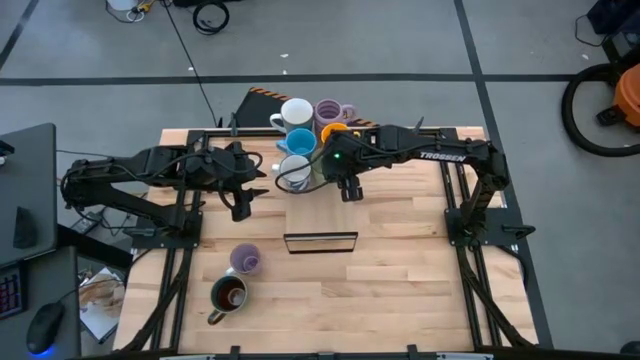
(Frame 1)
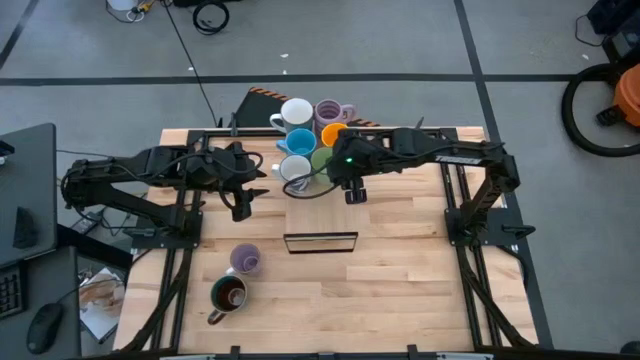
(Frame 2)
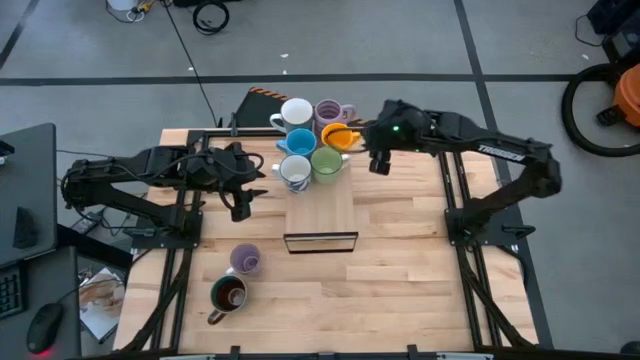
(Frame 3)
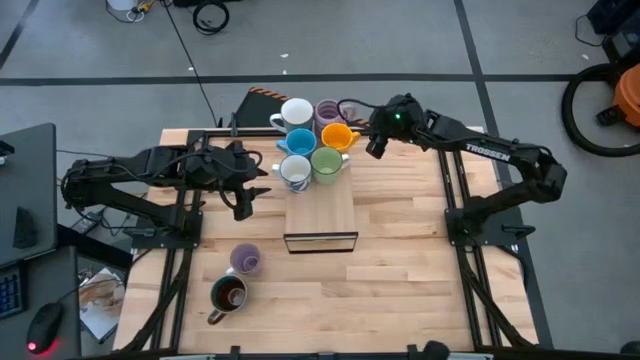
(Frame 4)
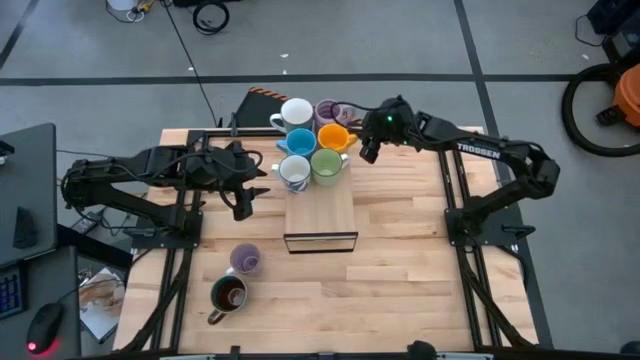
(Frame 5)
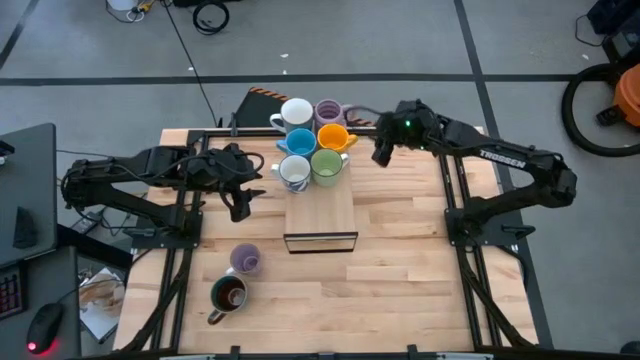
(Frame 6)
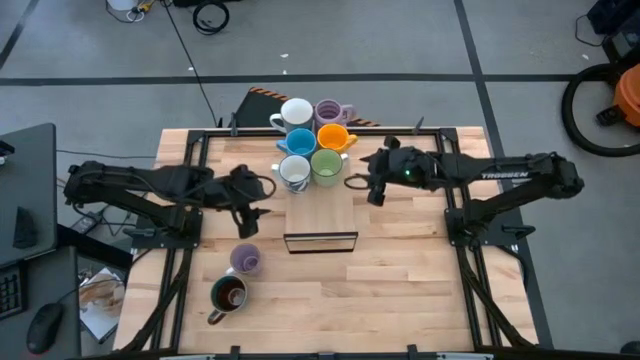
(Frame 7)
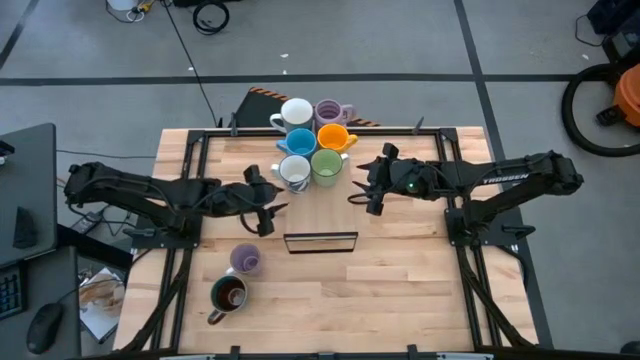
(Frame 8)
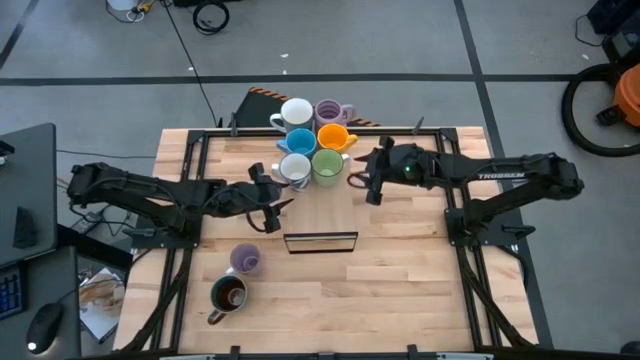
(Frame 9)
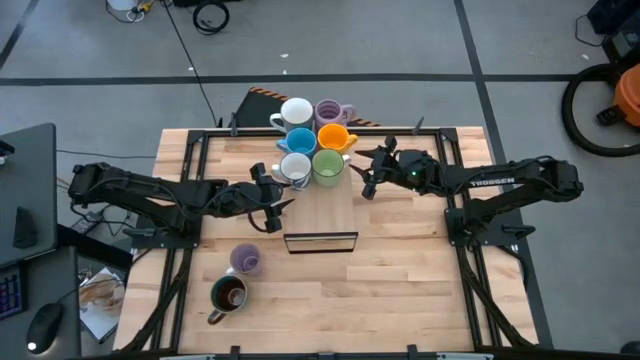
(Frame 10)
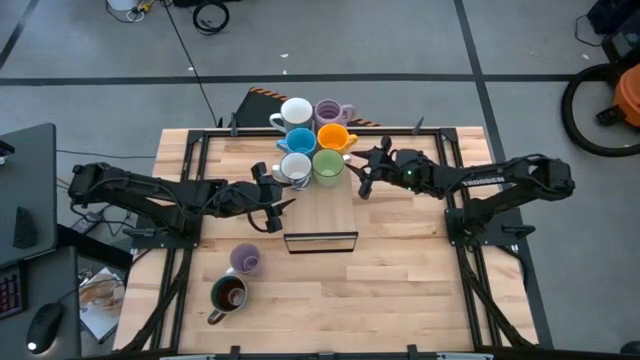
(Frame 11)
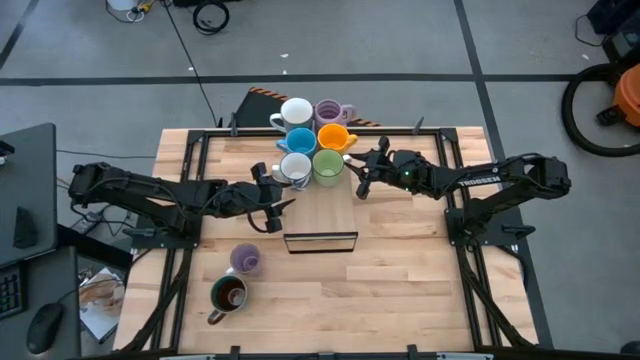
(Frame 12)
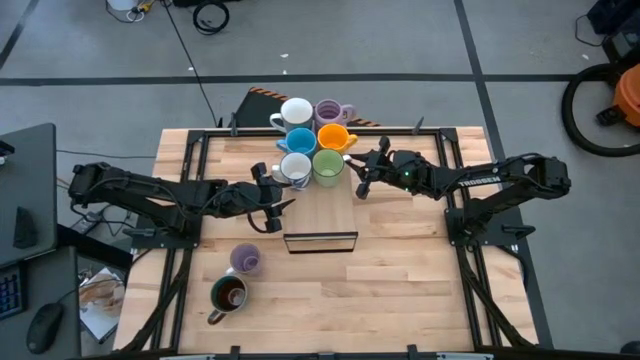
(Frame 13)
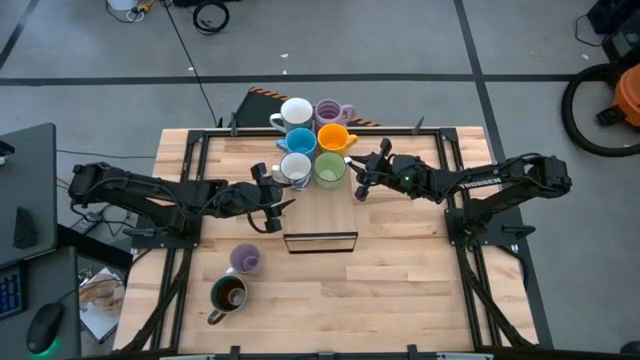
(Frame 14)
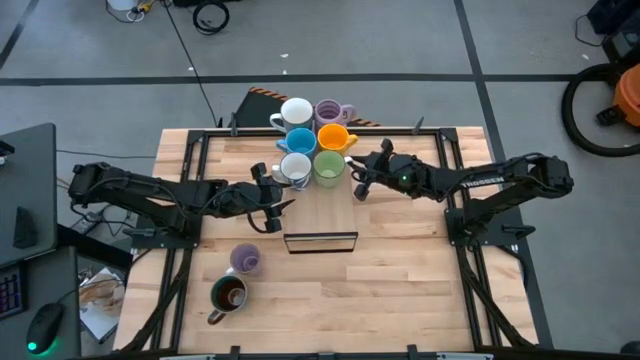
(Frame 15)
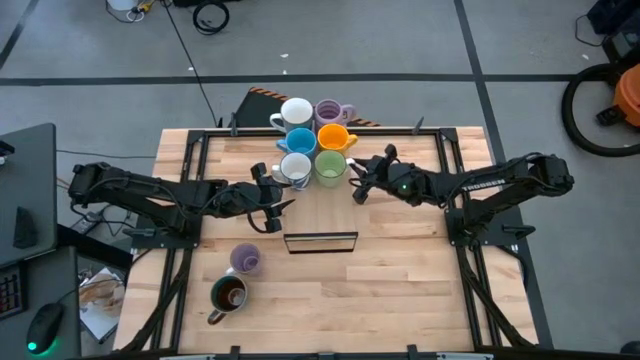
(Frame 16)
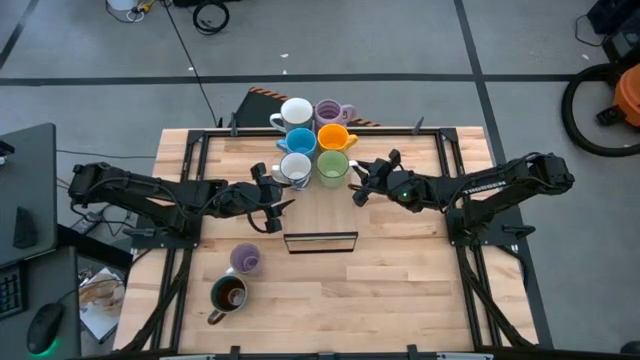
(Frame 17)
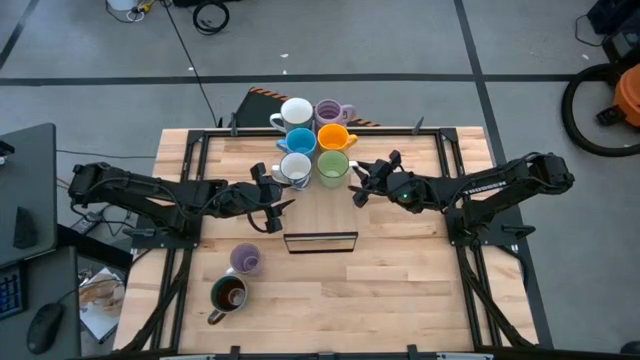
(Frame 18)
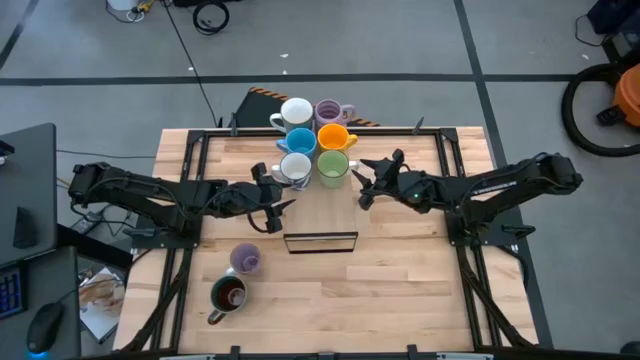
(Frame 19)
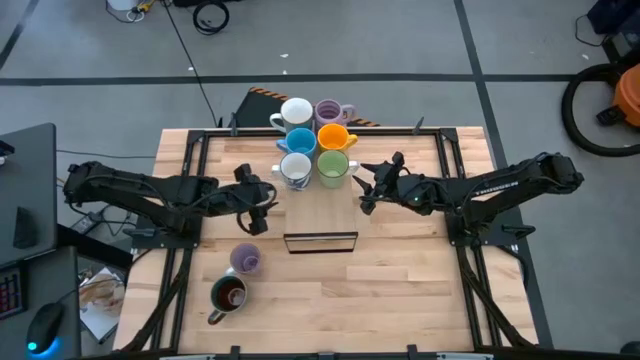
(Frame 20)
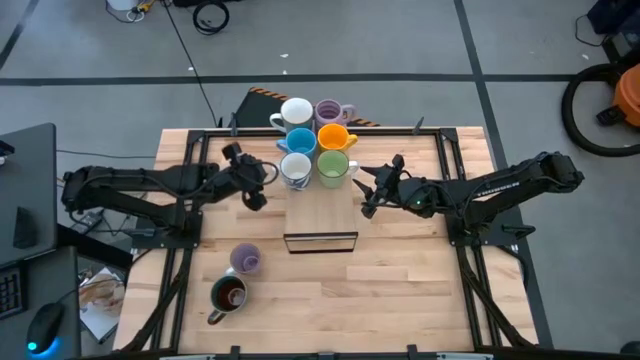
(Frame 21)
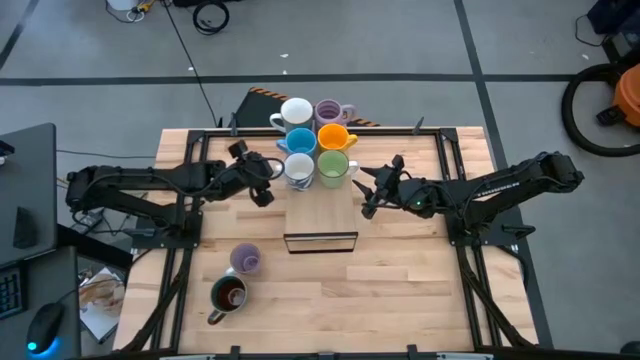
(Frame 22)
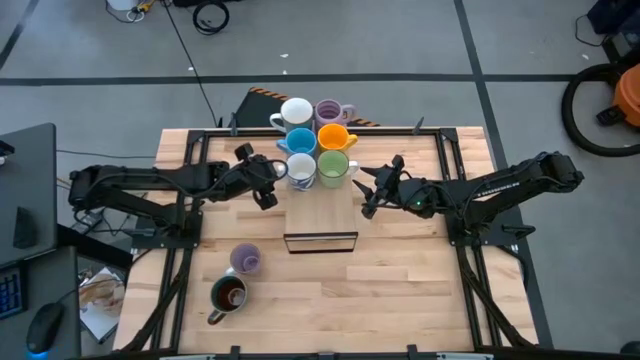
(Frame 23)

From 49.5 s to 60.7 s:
Task: Place coffee mugs
Adjust the mugs on the shelf

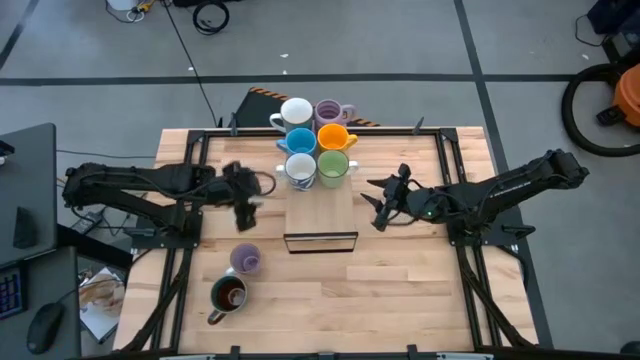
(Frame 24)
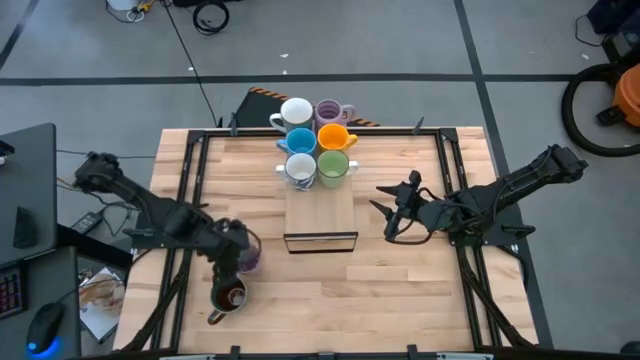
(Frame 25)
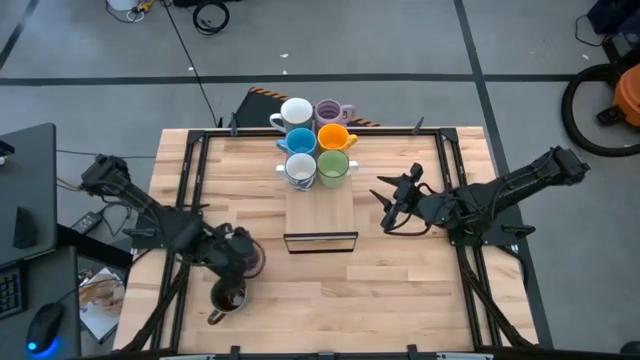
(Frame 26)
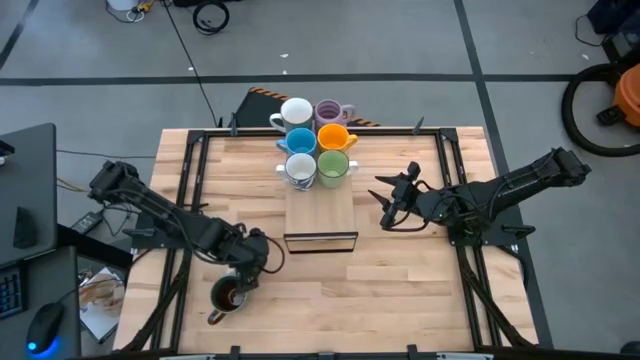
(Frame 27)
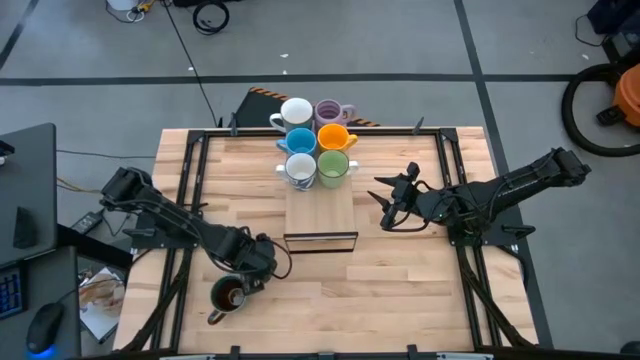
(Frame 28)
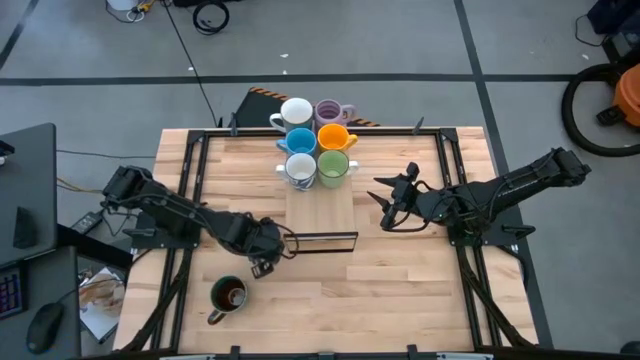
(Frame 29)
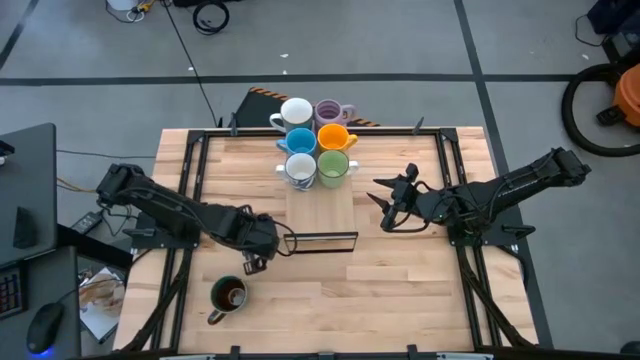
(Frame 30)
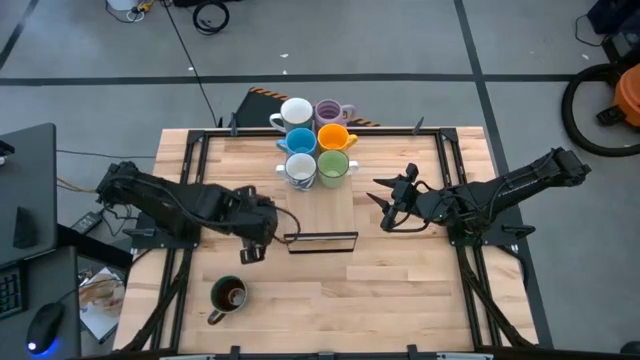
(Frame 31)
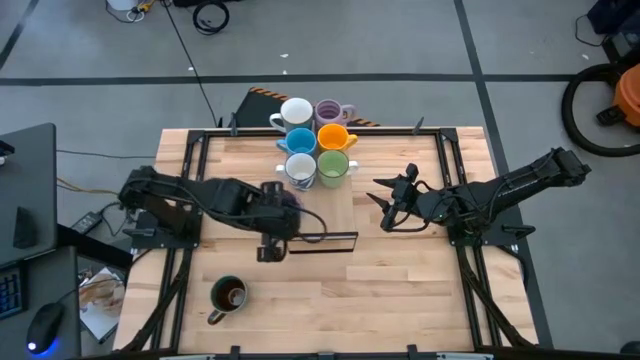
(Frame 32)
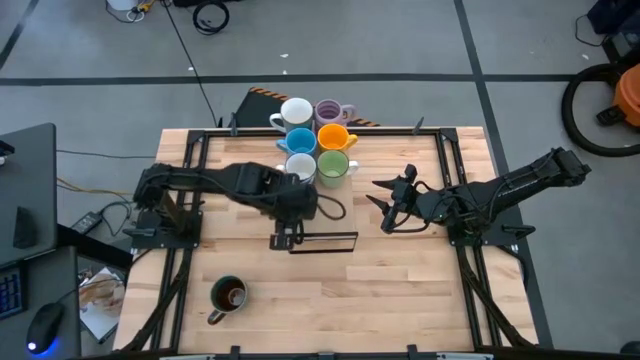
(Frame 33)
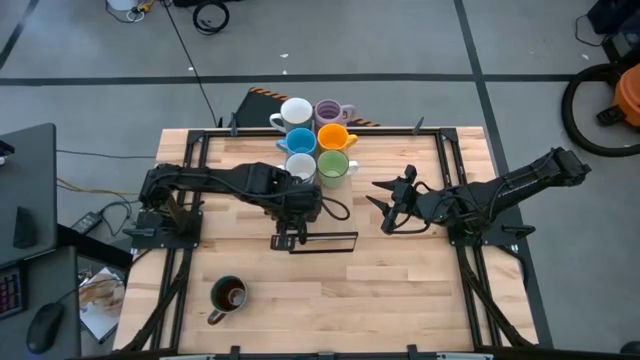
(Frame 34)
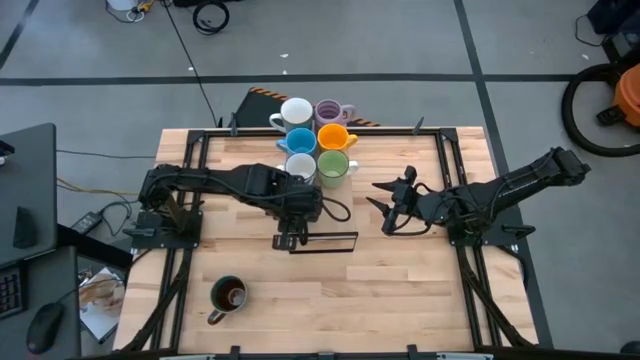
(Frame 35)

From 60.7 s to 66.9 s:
Put the purple mug on the shelf

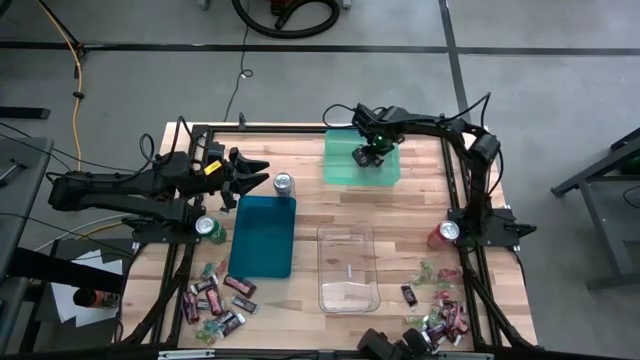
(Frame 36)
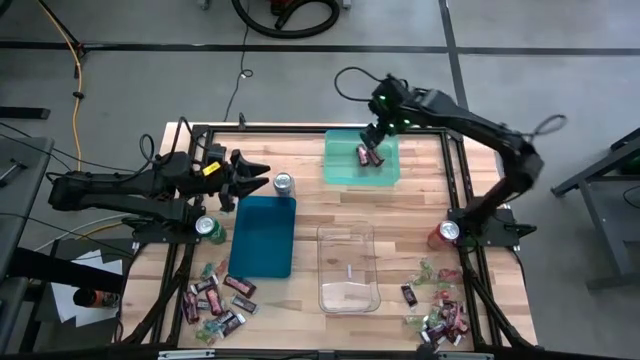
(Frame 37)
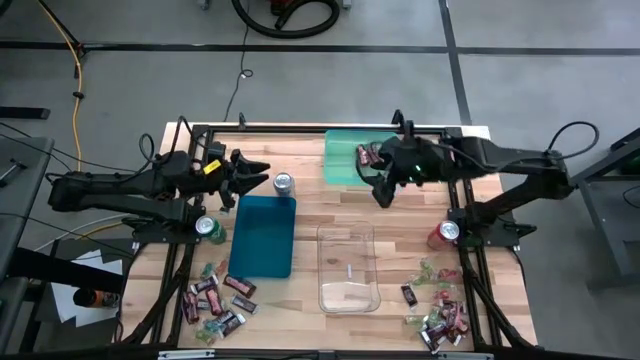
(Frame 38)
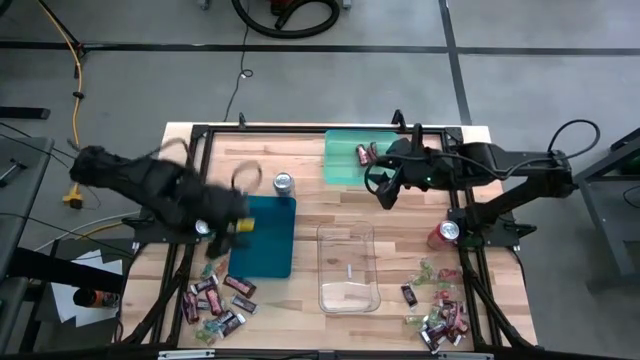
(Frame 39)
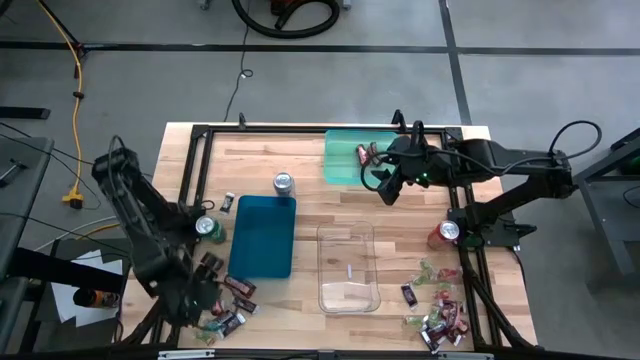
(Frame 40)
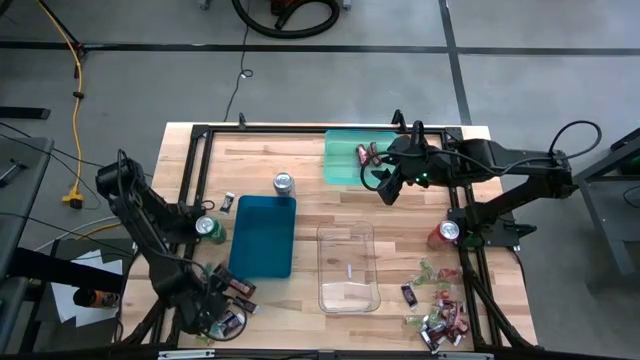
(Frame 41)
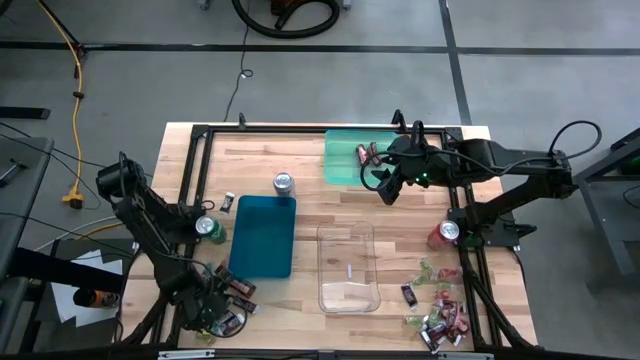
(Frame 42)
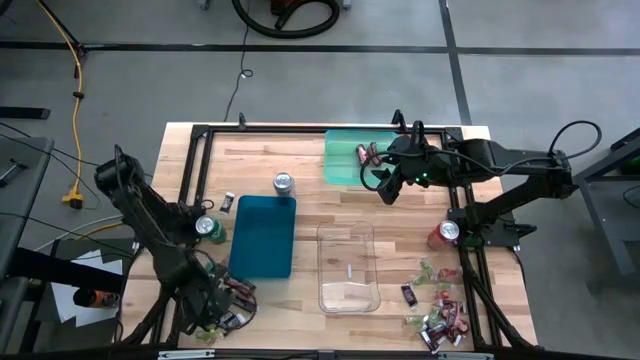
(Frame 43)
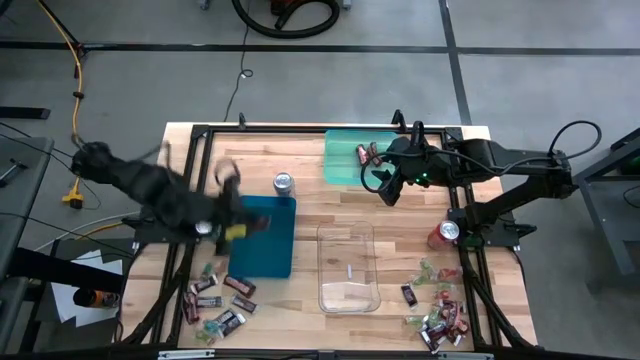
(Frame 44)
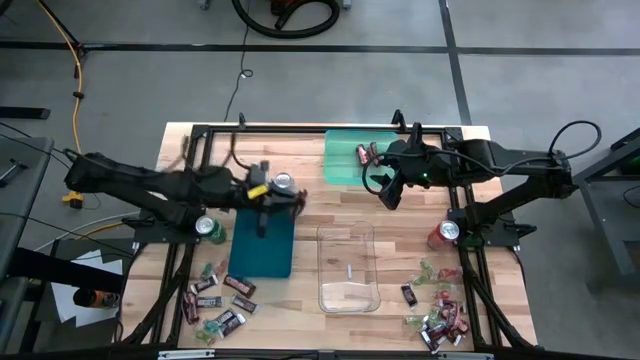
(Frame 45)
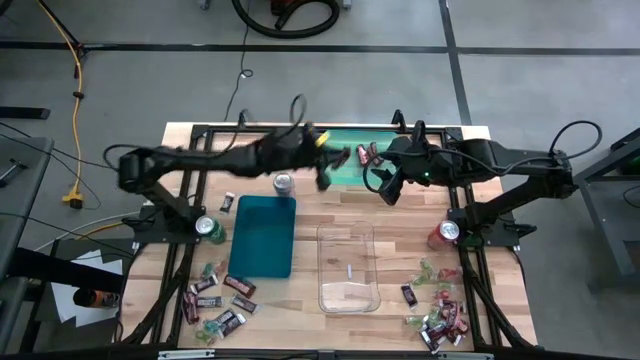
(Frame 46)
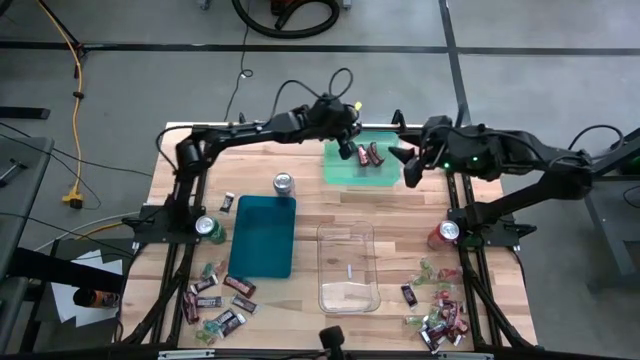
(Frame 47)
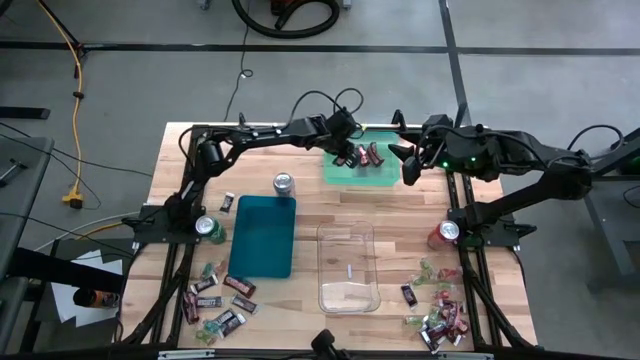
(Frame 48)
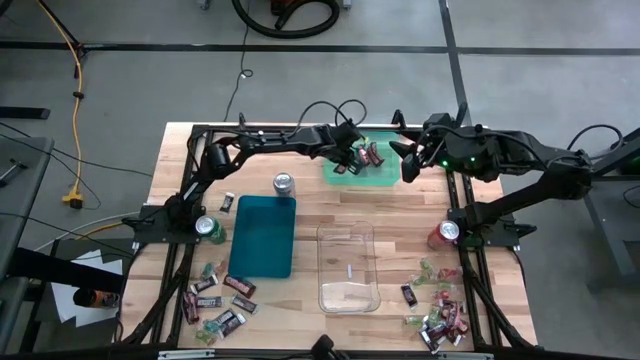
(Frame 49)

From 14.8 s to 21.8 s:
Task: Sort candy
Put the chocolate peanut bar into the green bin
